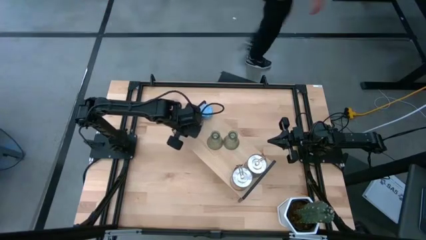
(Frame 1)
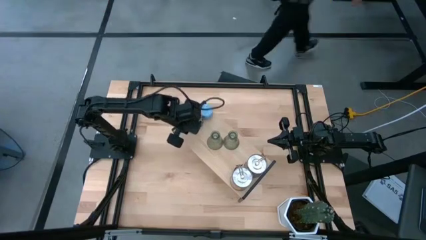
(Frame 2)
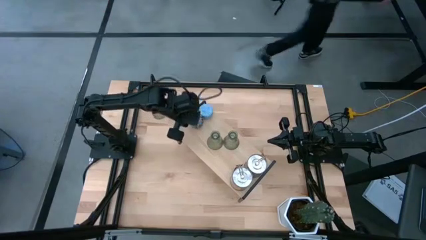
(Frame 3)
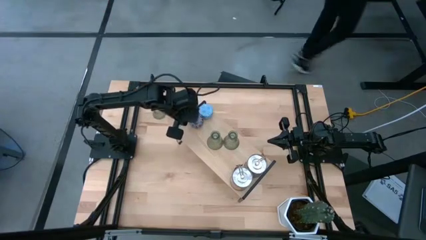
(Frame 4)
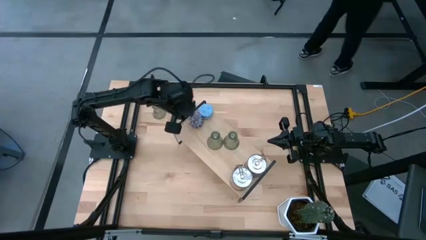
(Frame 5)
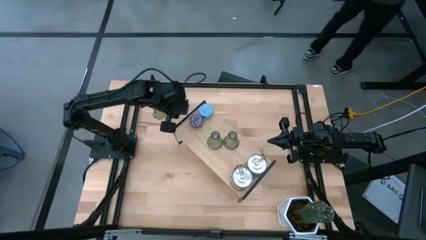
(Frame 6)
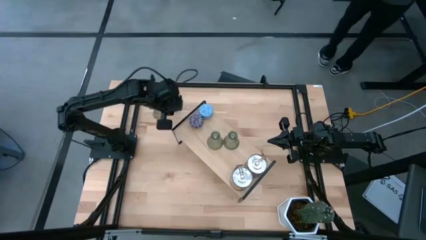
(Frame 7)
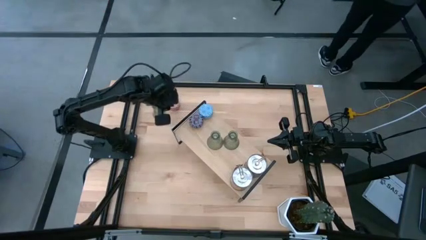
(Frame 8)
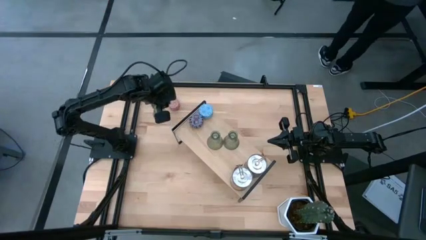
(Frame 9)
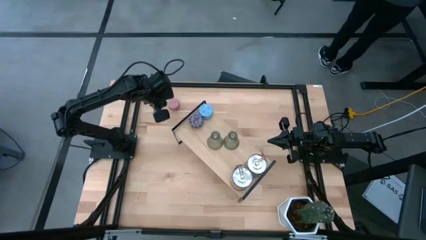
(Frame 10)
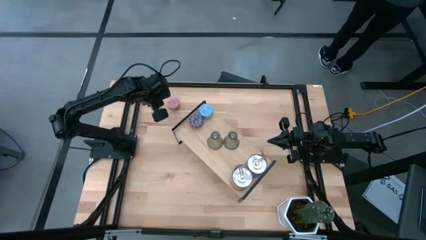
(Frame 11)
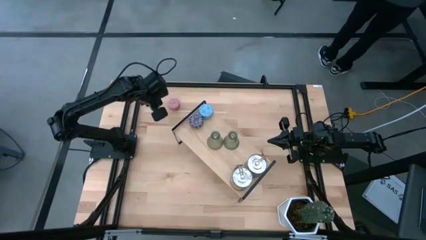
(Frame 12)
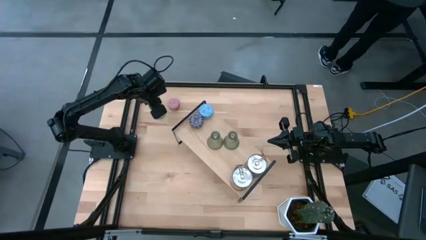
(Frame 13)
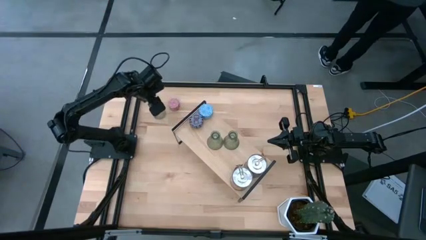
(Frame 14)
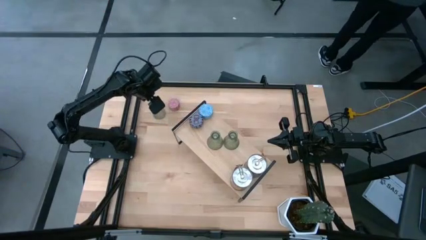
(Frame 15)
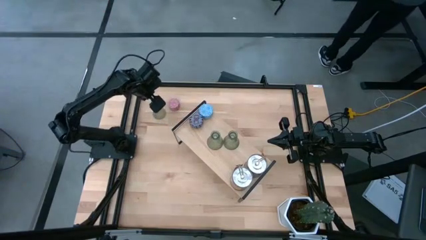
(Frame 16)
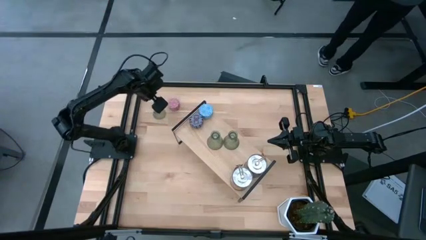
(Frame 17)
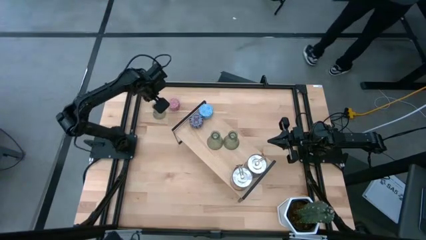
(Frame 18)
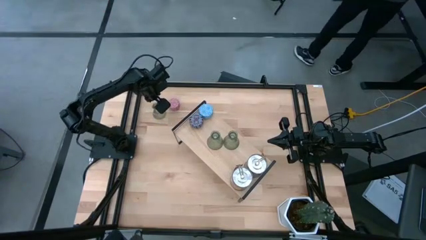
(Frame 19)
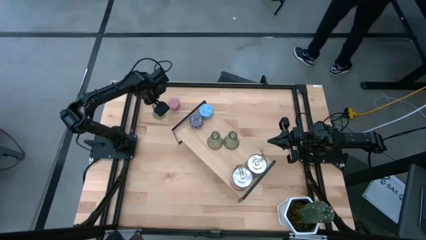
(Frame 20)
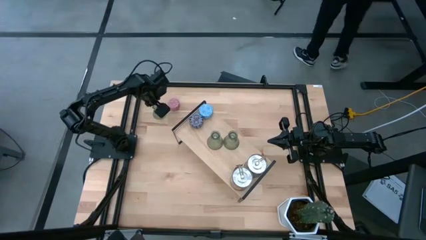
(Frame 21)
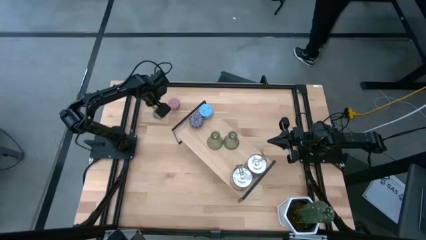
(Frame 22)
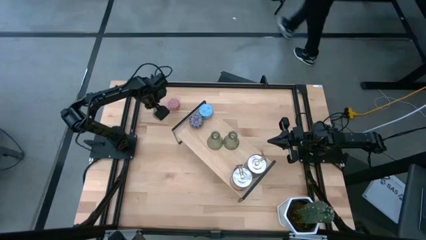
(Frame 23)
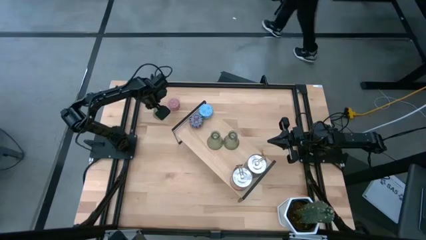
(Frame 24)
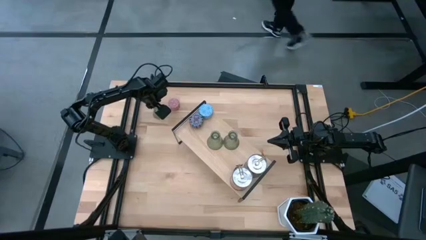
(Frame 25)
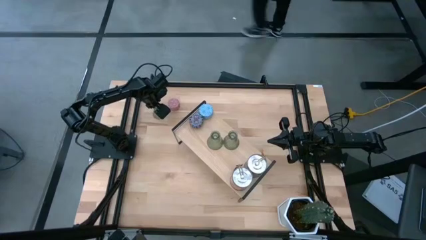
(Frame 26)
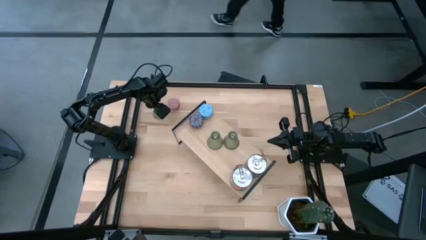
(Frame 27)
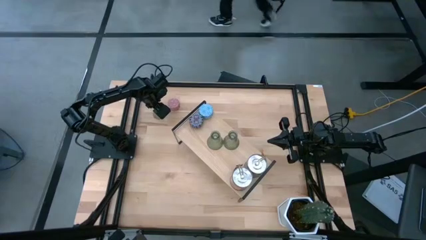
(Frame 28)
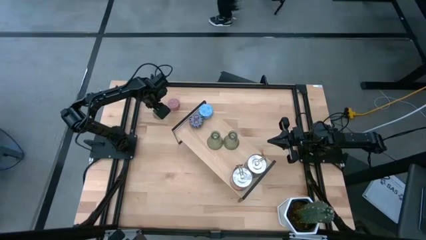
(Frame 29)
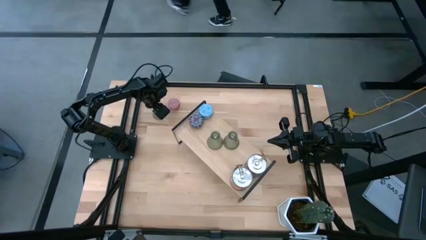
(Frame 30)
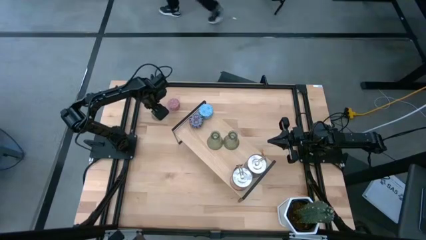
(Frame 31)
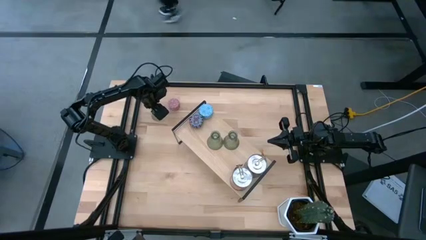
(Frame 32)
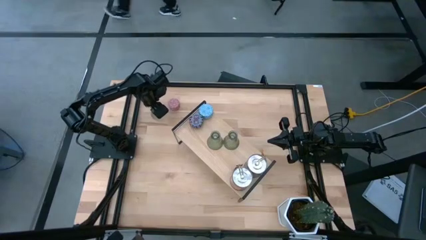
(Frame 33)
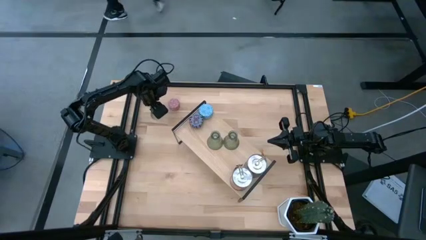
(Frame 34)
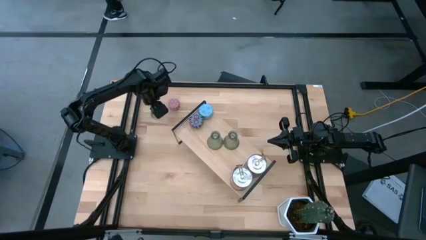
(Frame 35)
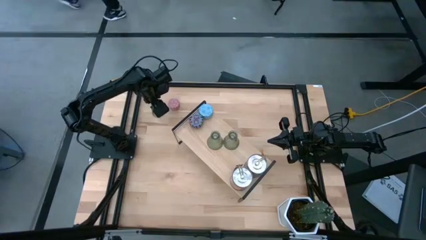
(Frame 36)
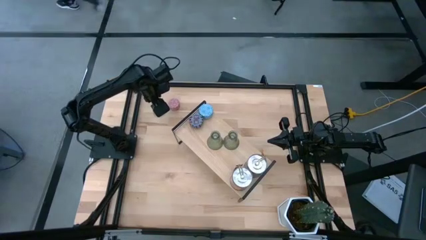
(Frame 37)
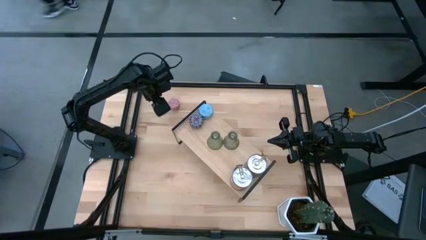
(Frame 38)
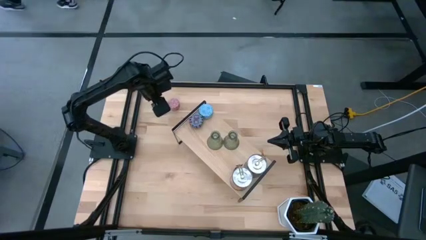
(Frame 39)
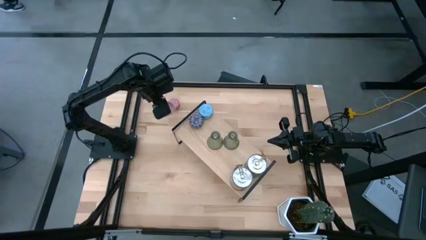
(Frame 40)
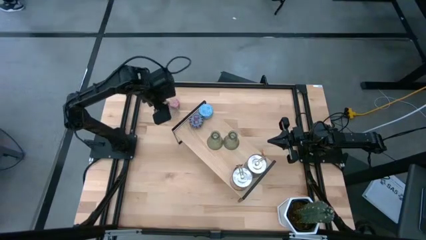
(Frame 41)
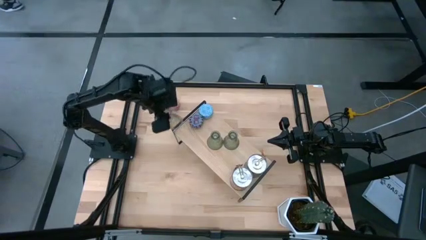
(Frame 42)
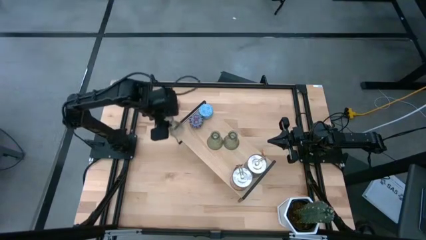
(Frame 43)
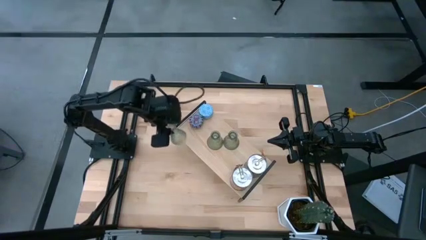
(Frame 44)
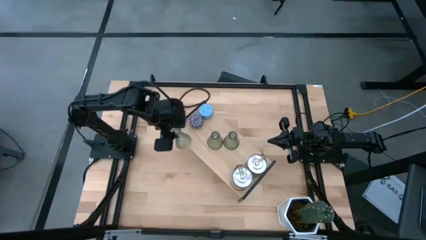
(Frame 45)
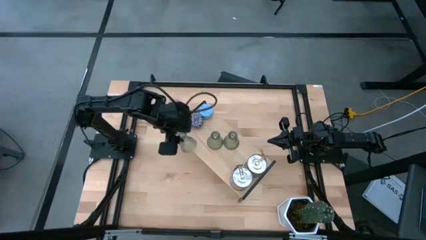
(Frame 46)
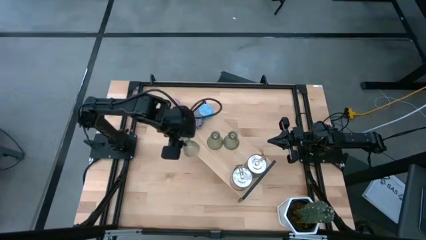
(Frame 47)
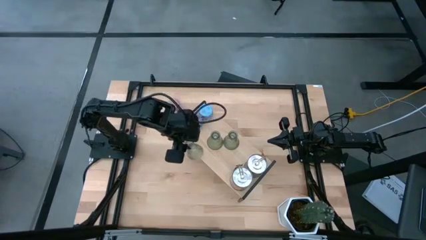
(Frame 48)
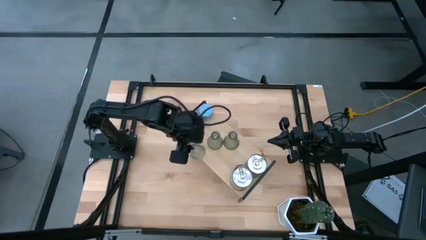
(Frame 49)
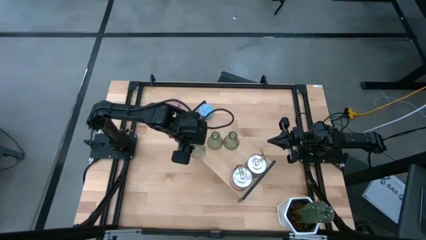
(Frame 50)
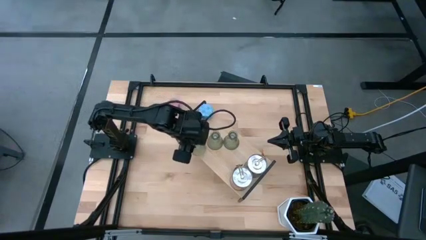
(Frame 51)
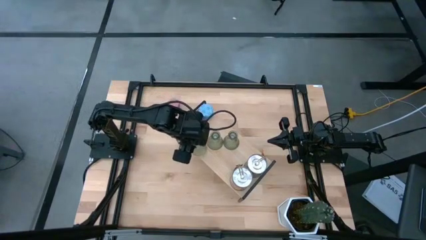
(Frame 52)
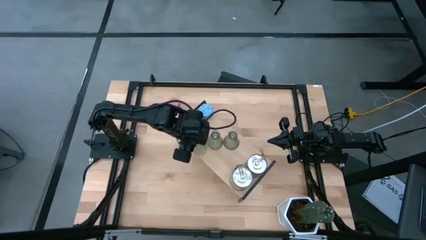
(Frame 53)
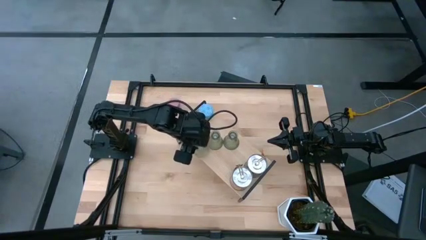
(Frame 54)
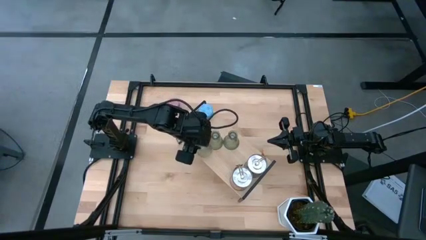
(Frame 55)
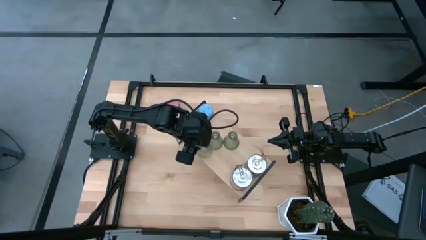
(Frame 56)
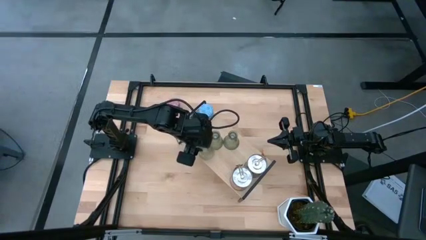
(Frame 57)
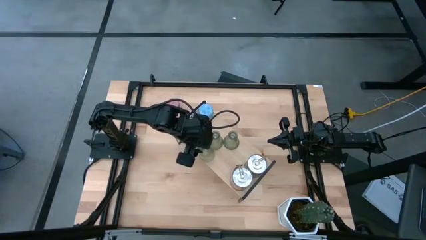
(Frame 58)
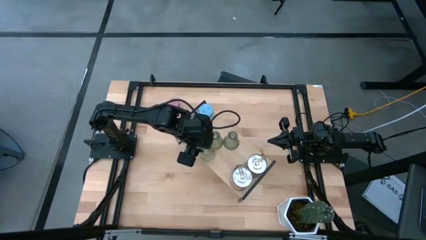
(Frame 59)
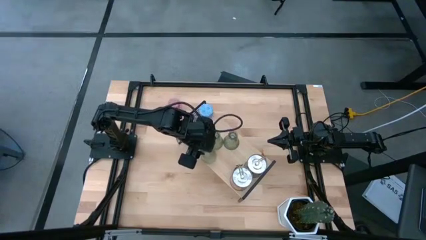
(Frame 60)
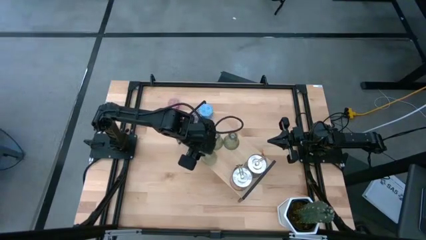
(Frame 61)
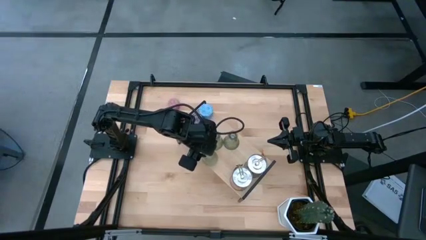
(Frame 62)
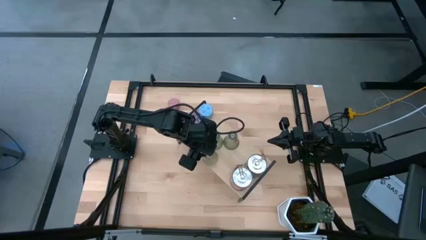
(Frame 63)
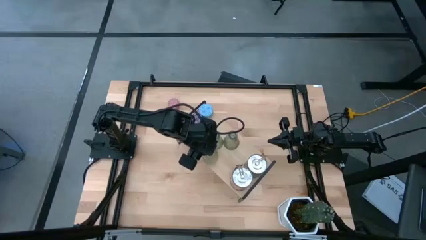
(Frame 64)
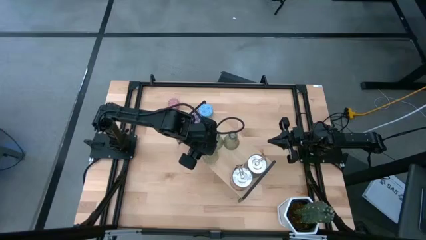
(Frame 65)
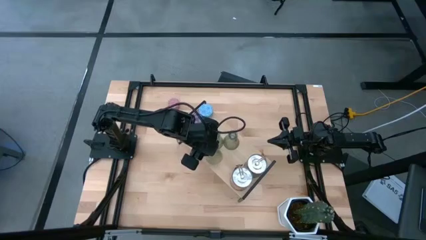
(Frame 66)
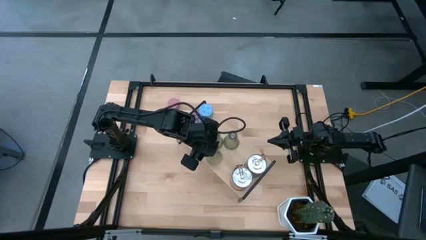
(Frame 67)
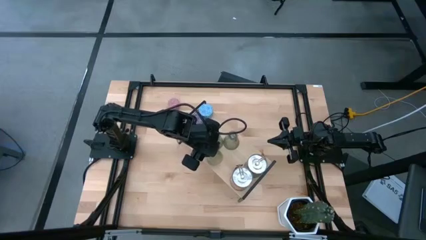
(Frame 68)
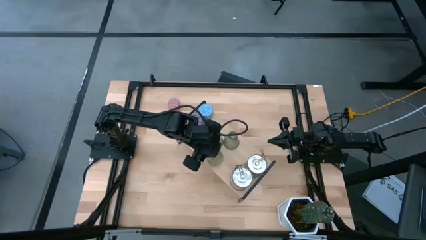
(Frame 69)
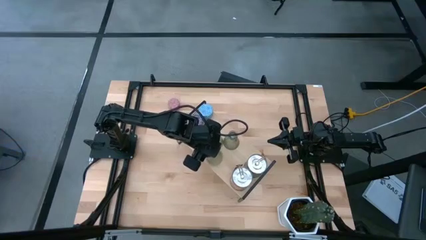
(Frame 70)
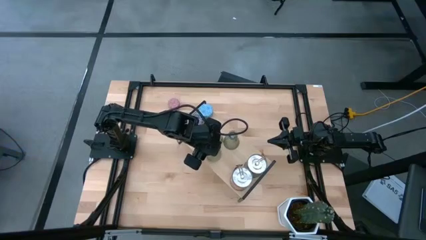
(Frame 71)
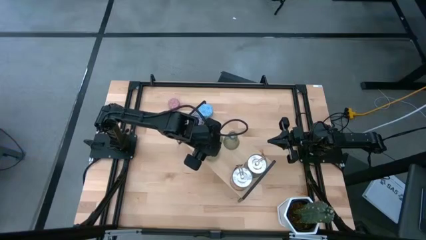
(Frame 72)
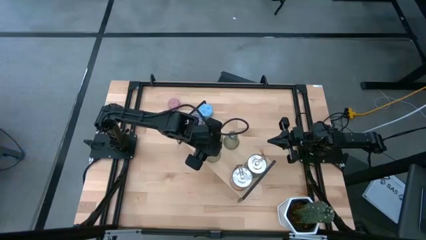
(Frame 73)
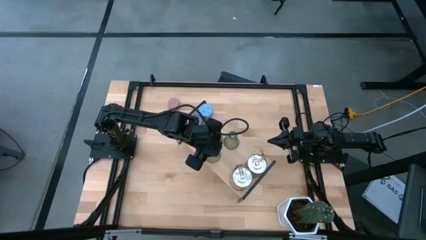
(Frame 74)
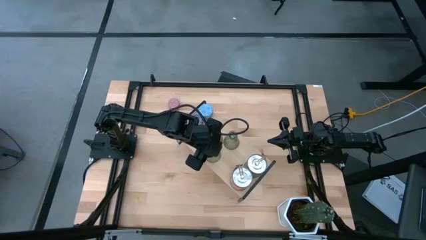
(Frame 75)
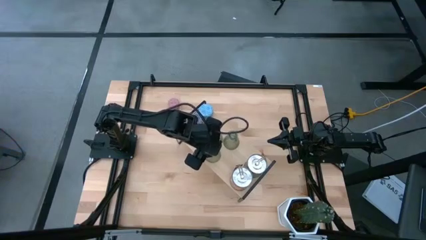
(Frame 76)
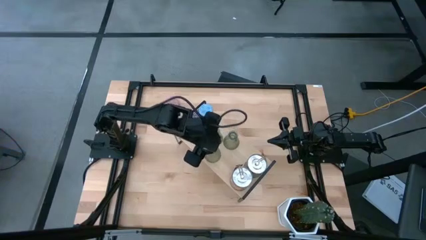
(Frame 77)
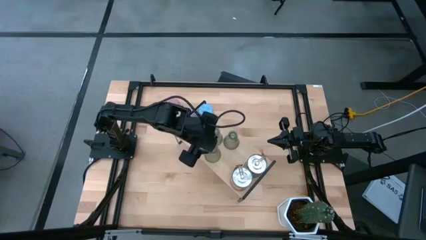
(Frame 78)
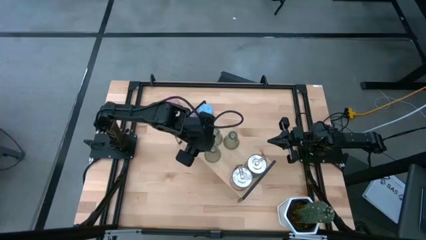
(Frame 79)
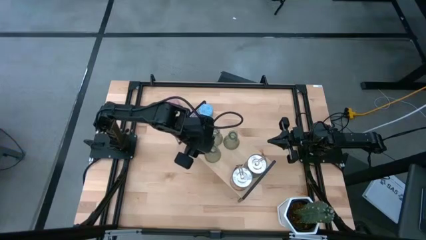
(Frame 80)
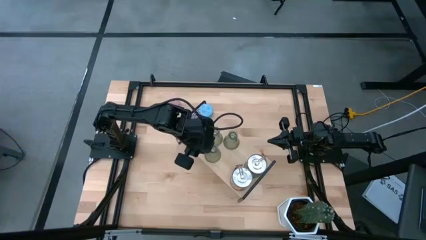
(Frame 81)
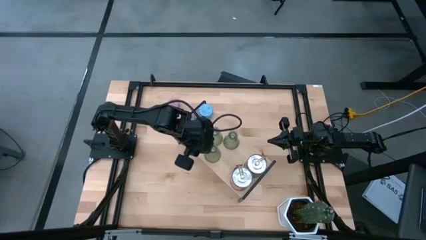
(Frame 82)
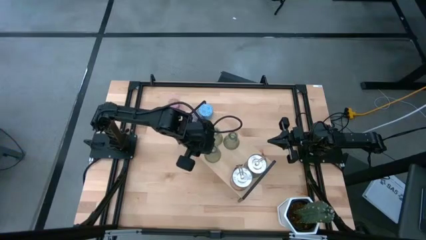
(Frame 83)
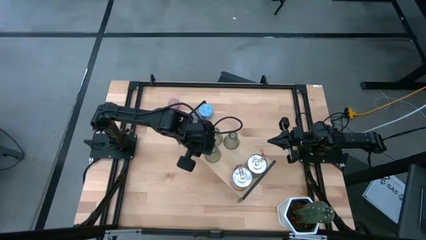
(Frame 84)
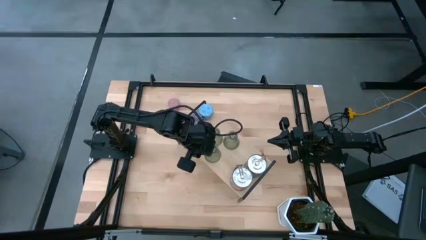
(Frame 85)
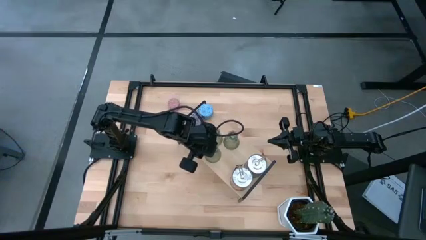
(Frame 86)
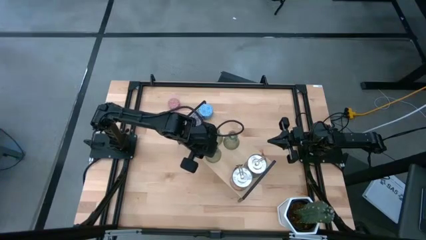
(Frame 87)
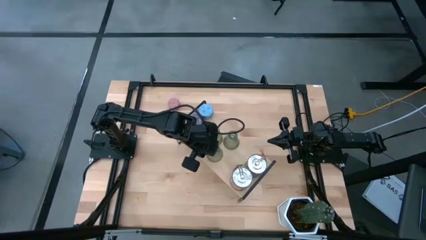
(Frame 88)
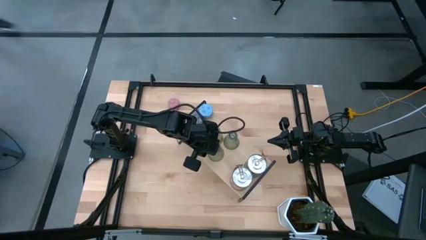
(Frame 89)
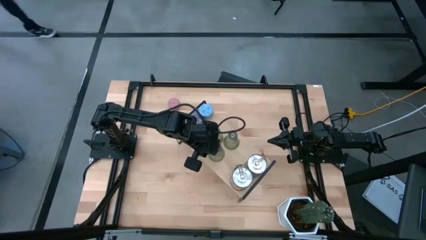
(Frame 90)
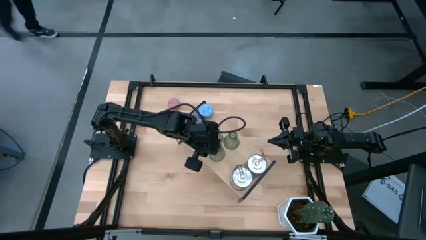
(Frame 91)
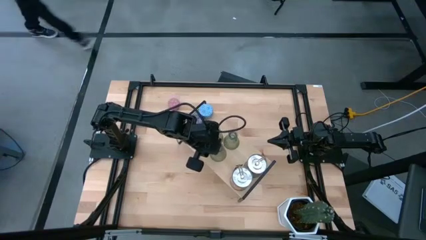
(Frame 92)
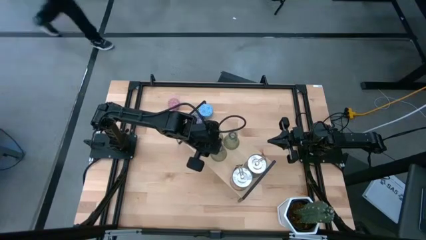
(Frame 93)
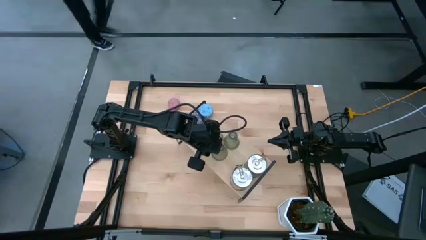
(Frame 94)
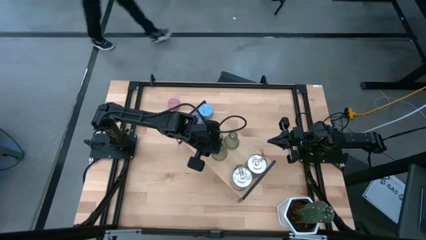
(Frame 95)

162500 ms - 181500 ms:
Task: Pick & Place candle stick holders
Put the transparent candle holder on the shelf
